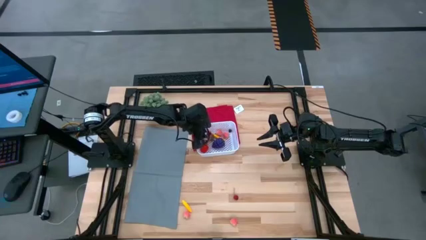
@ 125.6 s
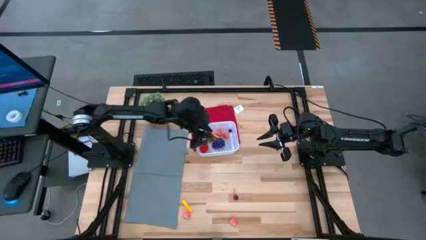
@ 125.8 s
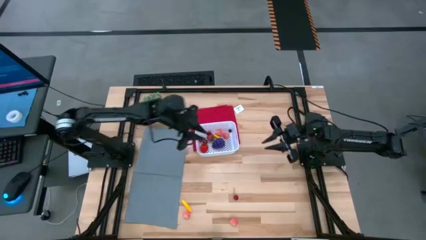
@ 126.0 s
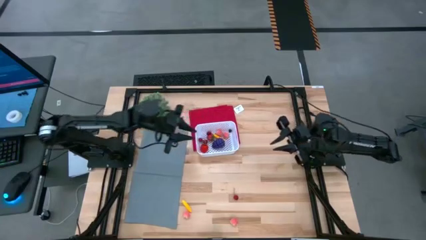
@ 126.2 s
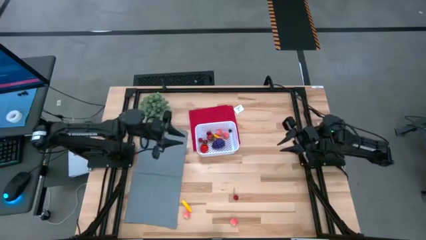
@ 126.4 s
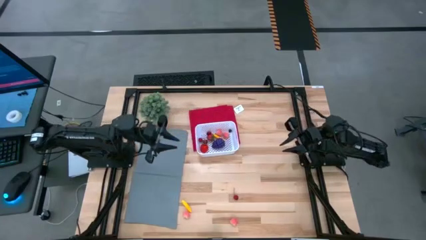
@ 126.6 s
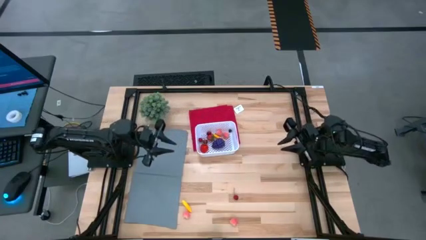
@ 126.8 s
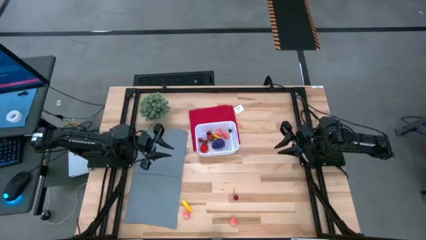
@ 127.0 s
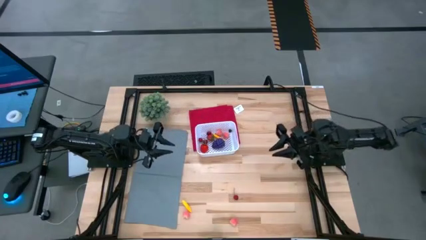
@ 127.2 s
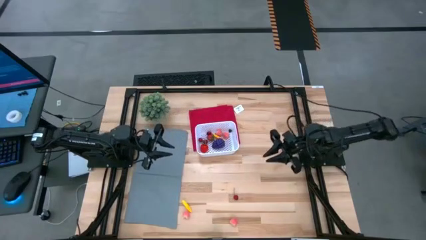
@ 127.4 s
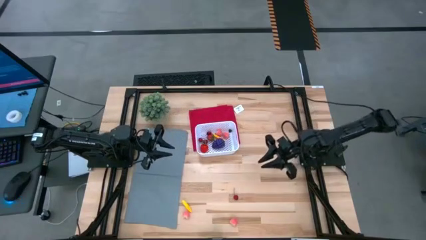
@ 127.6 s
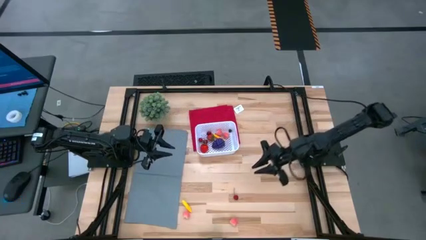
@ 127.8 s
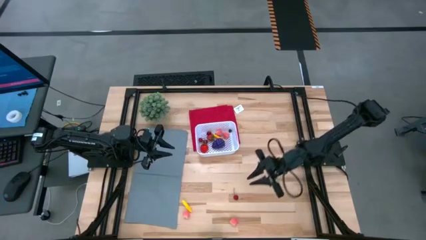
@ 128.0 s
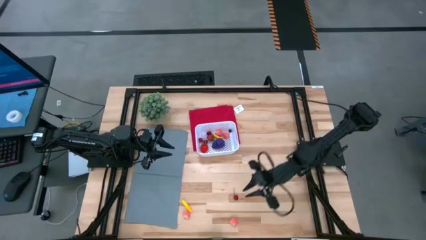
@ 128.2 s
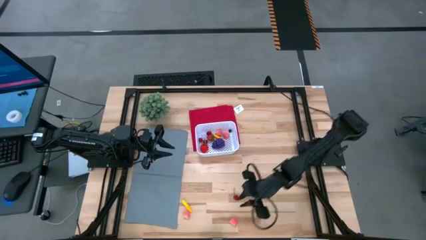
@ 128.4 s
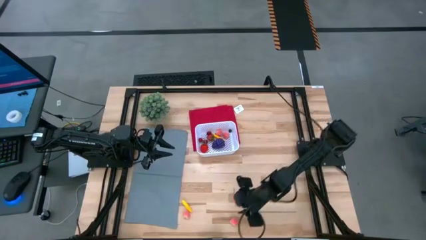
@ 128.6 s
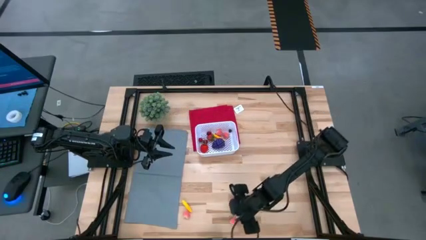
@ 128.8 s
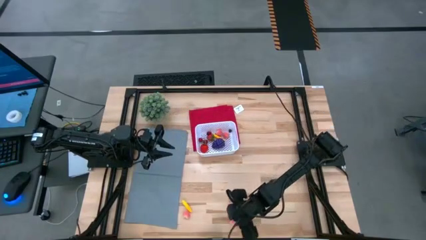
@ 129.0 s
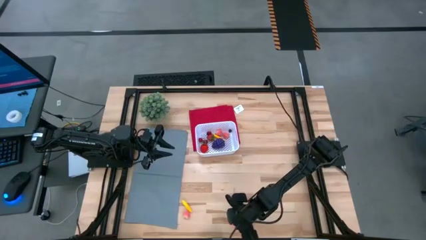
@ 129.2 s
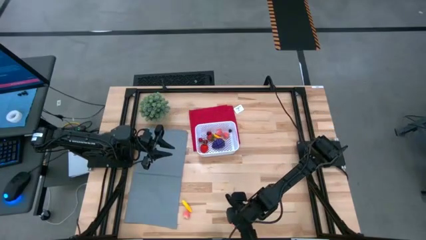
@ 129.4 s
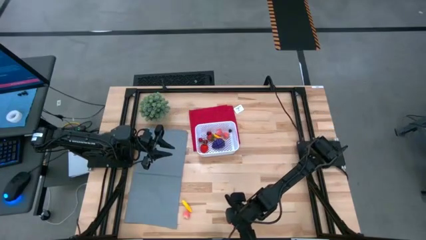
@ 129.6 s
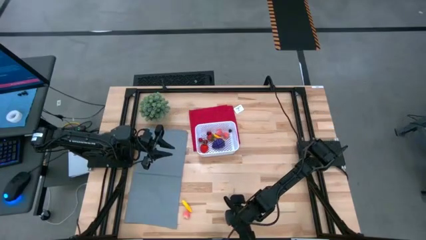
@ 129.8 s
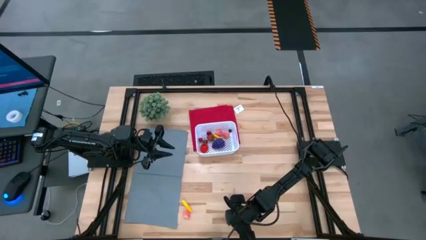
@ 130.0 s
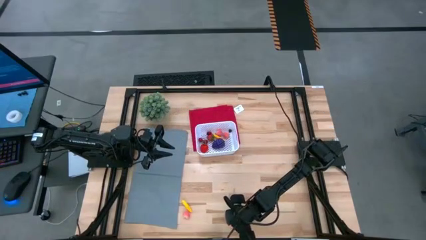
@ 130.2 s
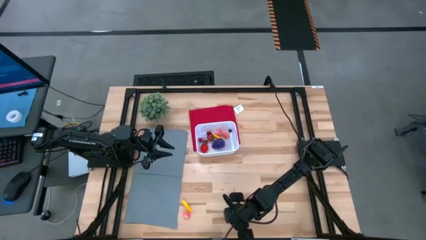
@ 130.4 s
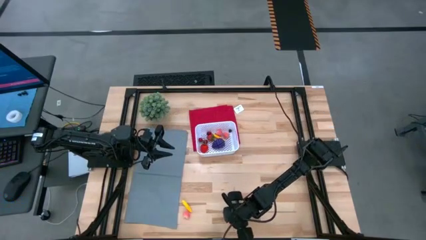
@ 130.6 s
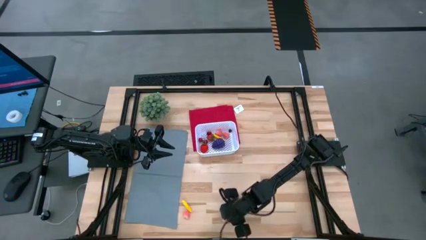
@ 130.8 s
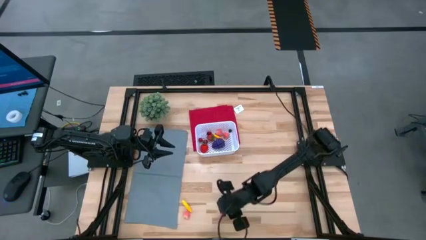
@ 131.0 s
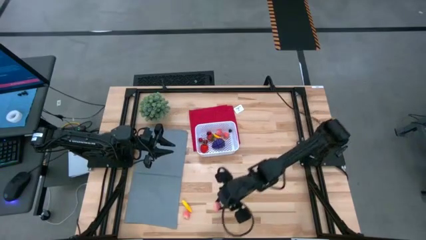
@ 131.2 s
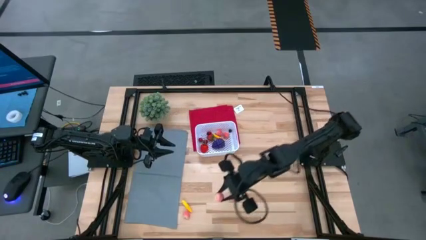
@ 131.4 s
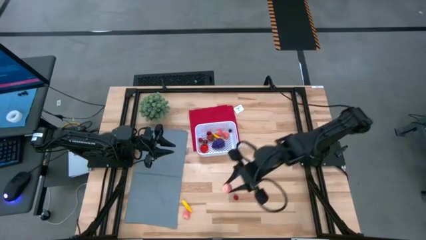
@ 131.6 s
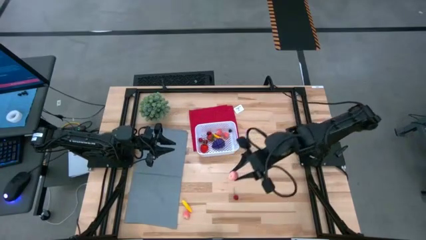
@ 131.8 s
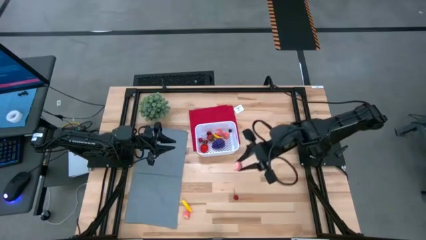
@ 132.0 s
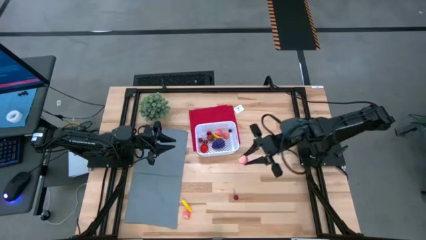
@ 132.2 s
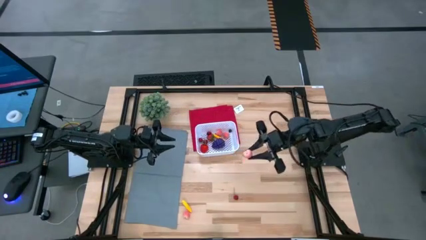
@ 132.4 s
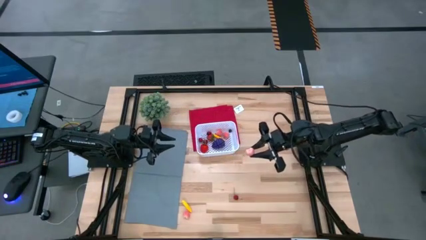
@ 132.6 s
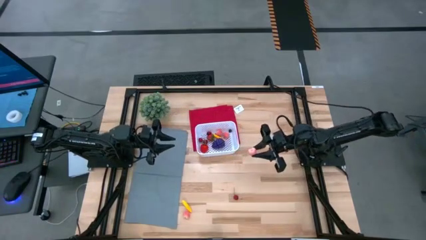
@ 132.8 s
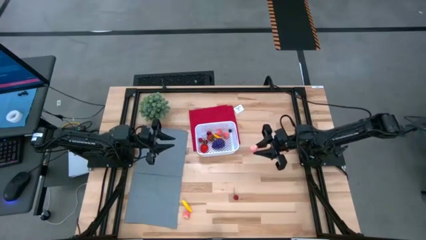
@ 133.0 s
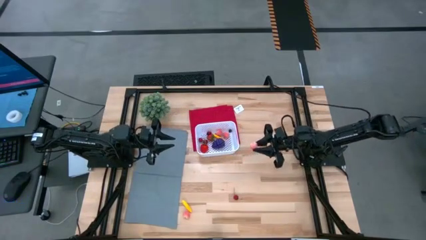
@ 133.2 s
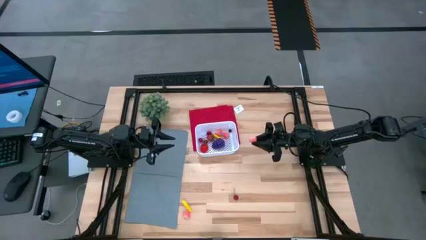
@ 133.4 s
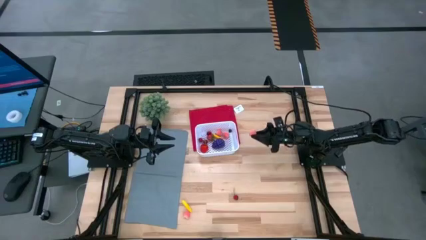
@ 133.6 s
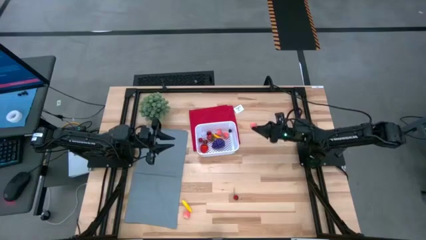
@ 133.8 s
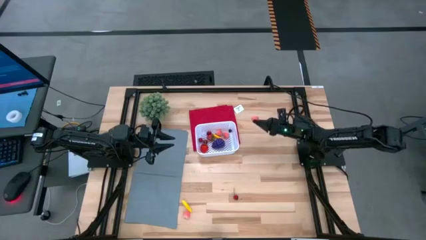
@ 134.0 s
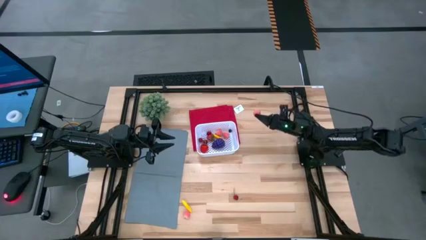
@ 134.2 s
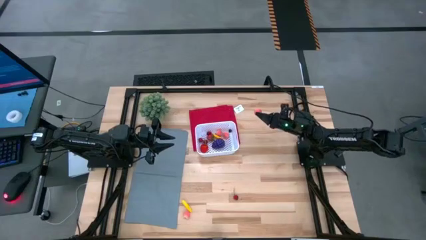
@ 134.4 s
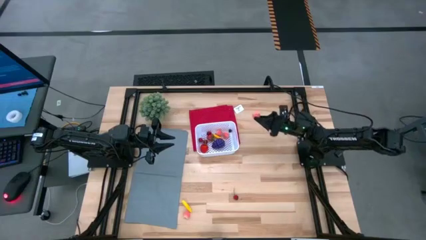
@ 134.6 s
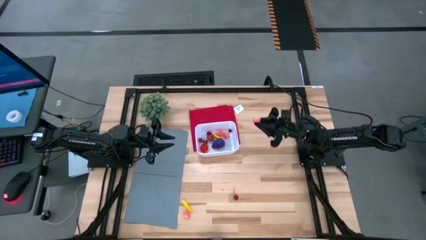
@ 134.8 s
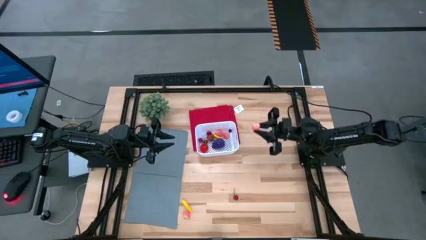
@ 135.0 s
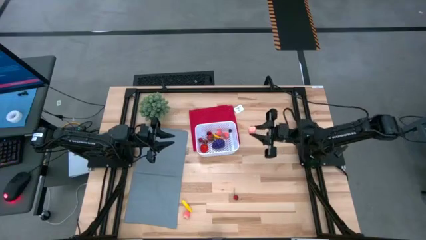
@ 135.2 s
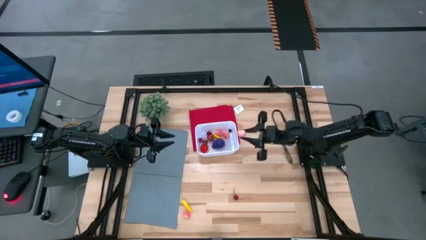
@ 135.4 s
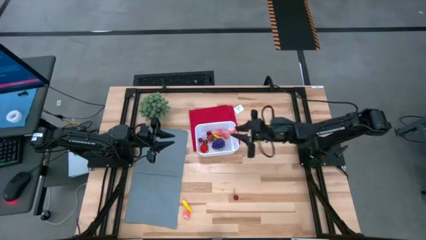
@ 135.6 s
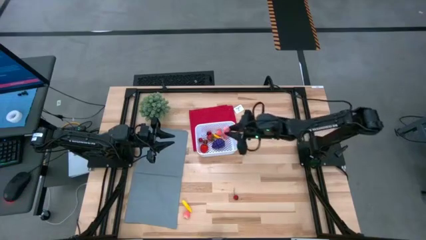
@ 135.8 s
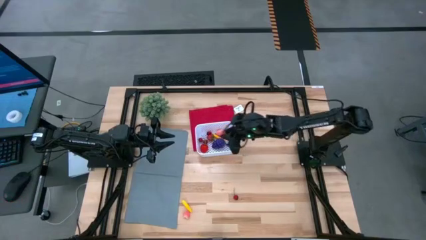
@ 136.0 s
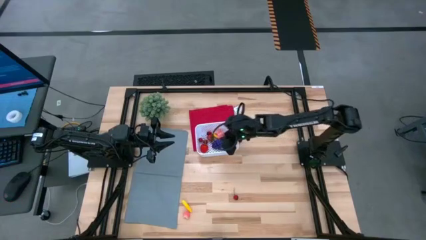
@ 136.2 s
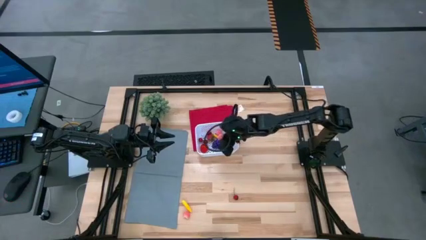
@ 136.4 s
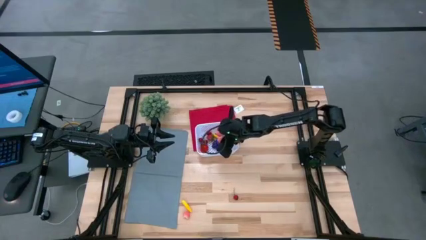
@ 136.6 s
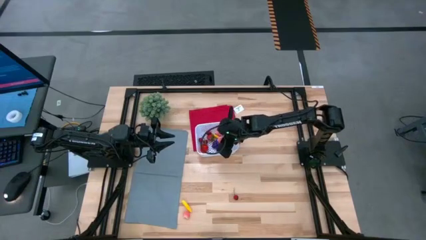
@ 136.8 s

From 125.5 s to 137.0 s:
Task: Pick and placing Produce into tupperware
Put the pink peach into the white bin
